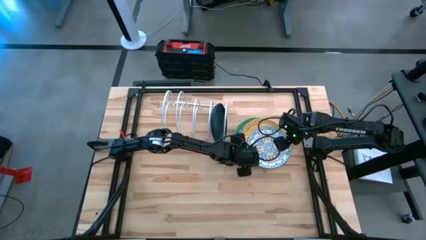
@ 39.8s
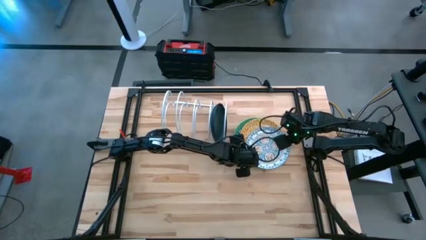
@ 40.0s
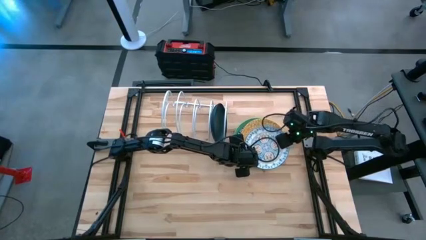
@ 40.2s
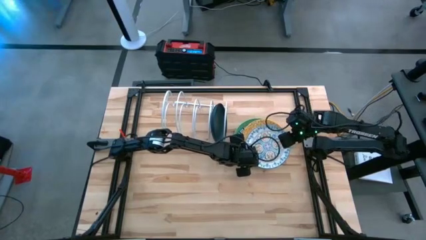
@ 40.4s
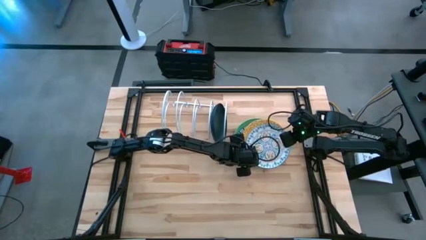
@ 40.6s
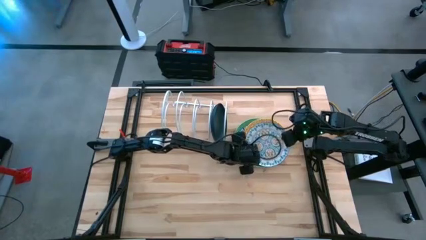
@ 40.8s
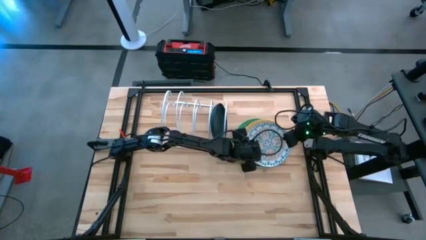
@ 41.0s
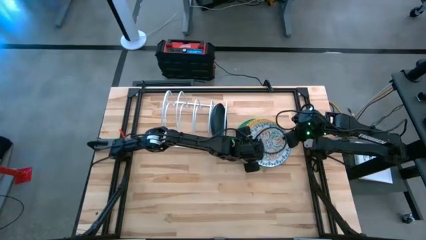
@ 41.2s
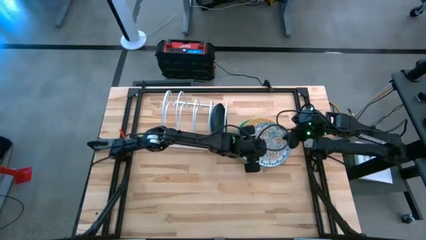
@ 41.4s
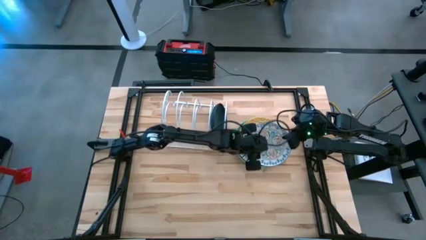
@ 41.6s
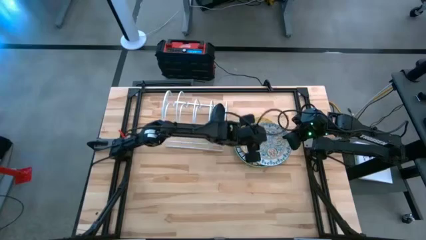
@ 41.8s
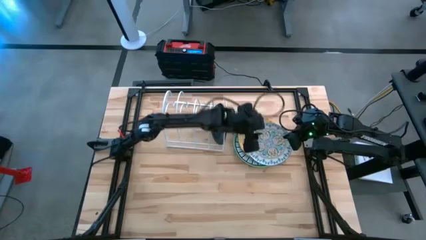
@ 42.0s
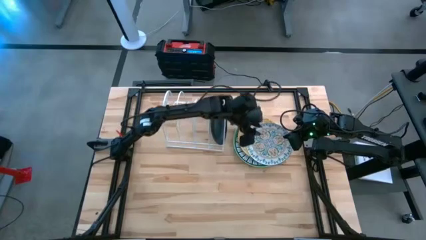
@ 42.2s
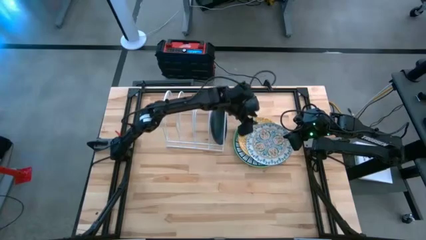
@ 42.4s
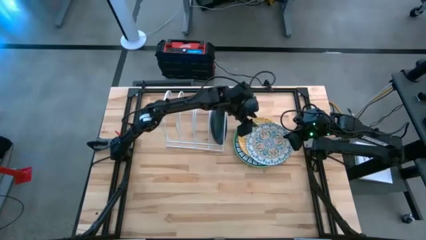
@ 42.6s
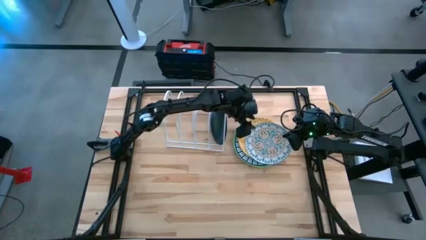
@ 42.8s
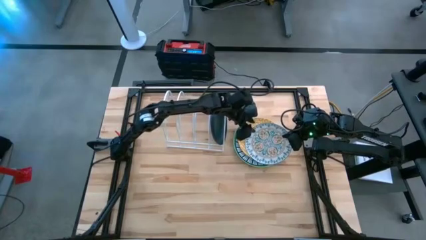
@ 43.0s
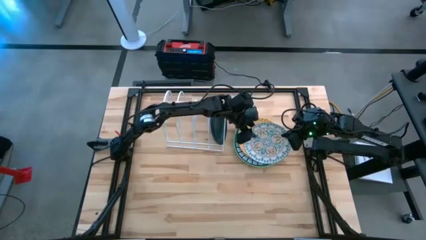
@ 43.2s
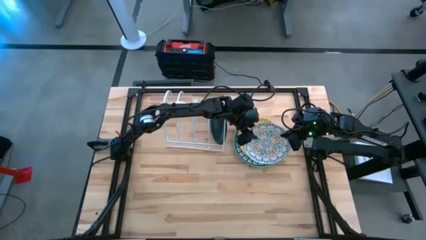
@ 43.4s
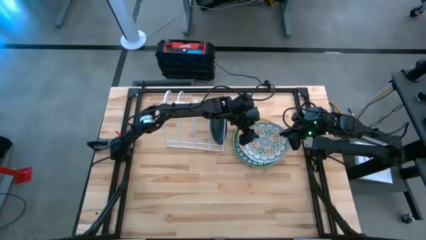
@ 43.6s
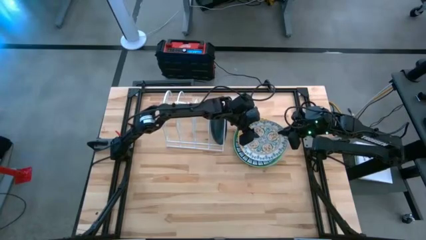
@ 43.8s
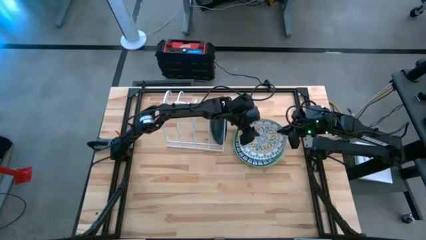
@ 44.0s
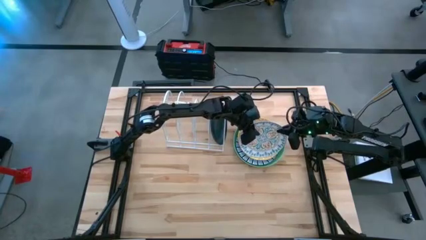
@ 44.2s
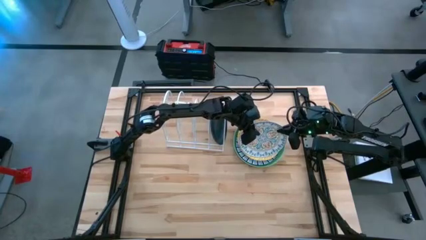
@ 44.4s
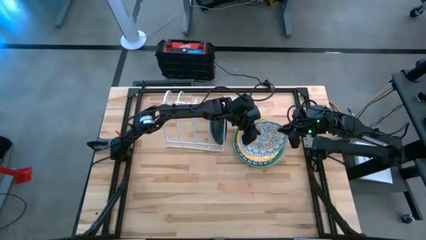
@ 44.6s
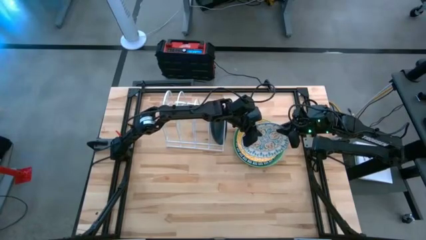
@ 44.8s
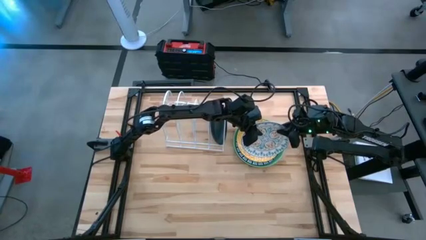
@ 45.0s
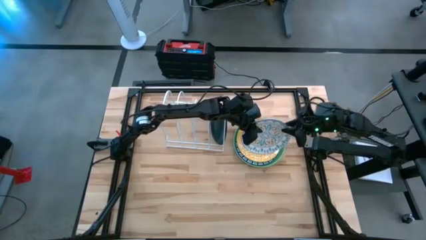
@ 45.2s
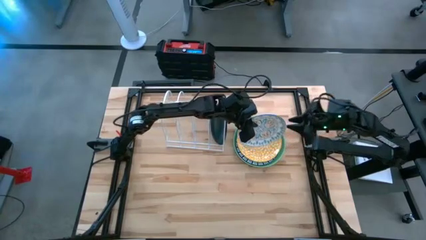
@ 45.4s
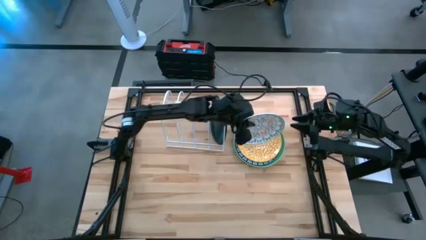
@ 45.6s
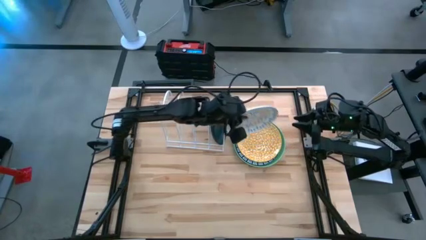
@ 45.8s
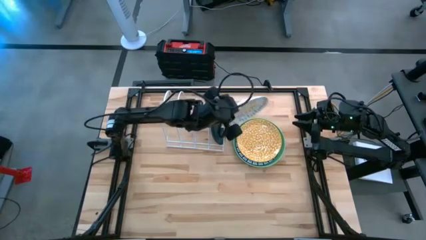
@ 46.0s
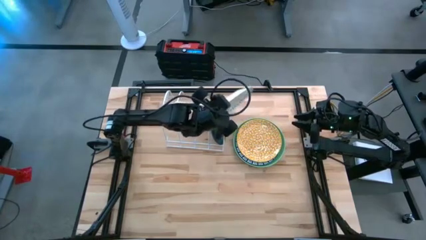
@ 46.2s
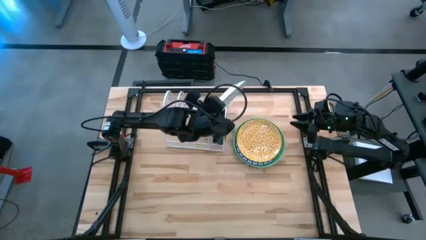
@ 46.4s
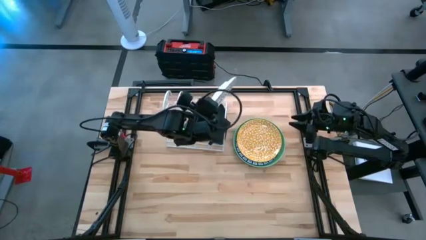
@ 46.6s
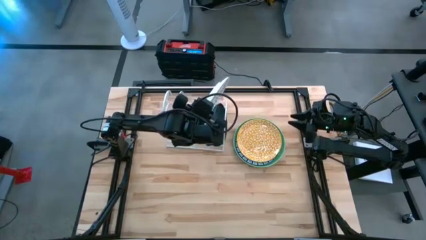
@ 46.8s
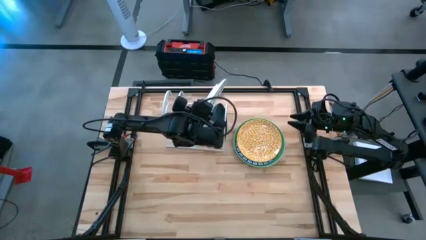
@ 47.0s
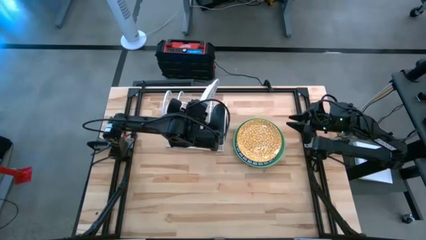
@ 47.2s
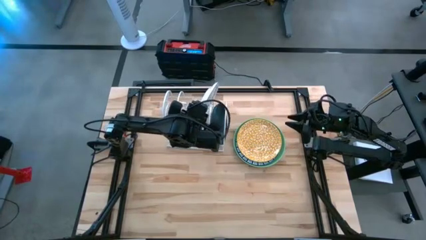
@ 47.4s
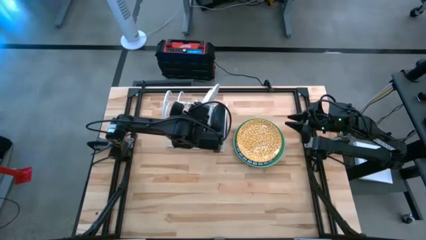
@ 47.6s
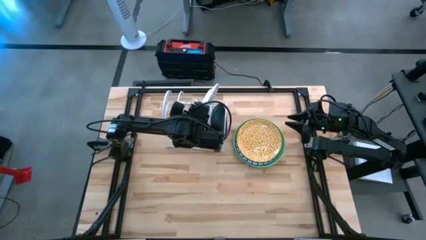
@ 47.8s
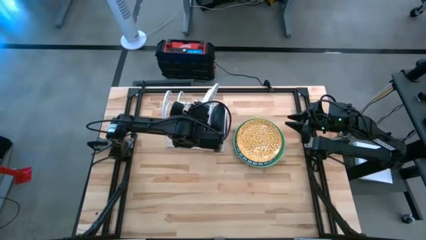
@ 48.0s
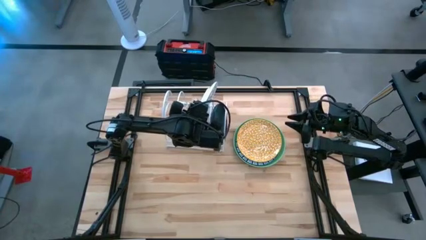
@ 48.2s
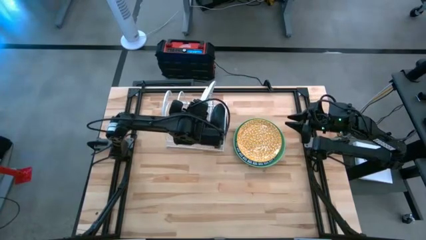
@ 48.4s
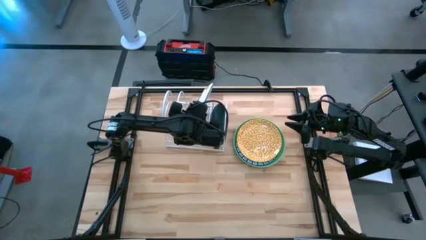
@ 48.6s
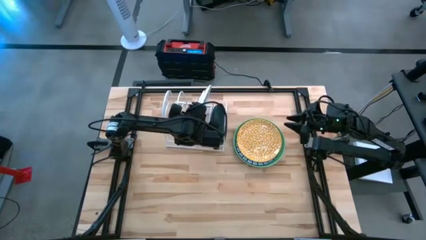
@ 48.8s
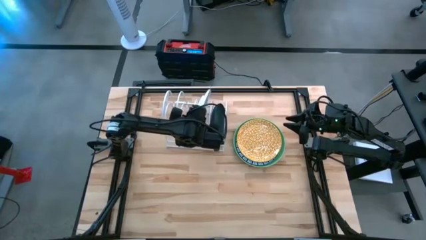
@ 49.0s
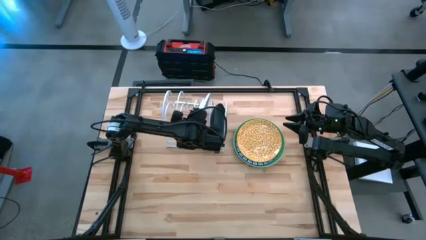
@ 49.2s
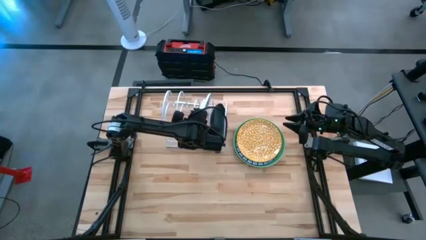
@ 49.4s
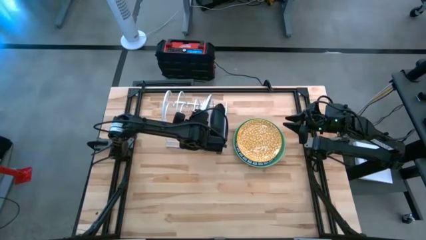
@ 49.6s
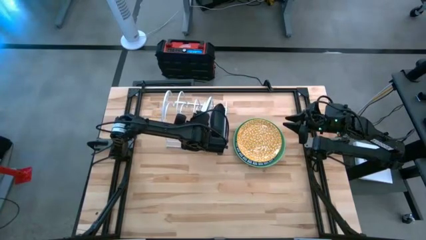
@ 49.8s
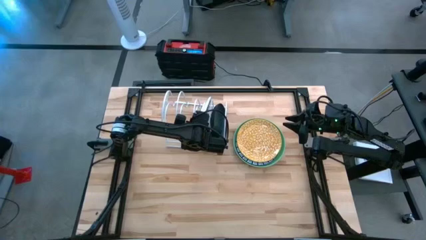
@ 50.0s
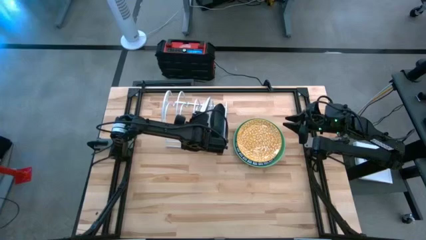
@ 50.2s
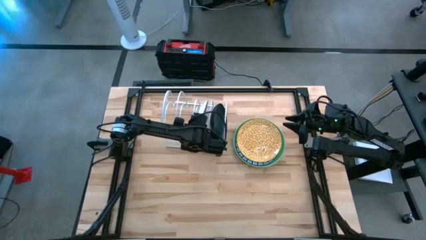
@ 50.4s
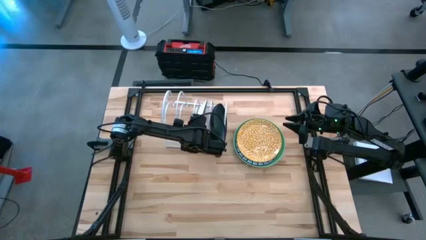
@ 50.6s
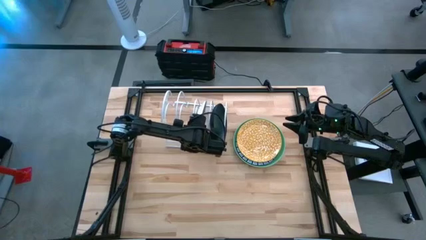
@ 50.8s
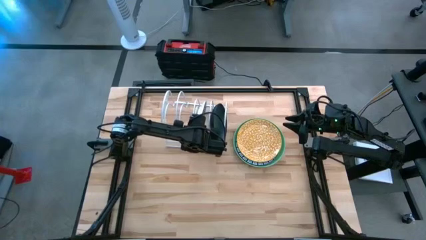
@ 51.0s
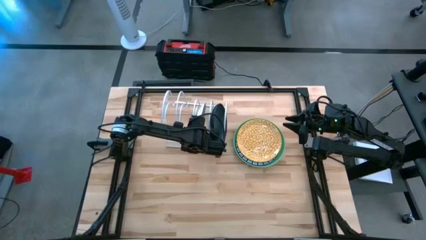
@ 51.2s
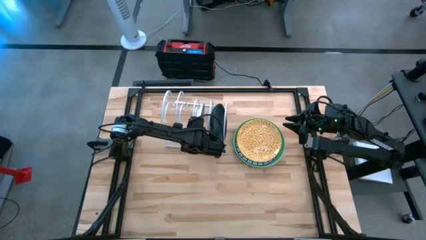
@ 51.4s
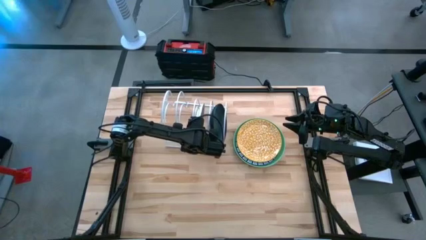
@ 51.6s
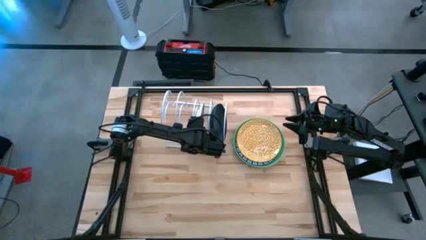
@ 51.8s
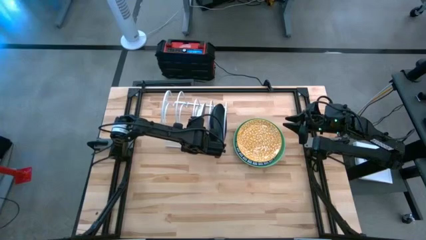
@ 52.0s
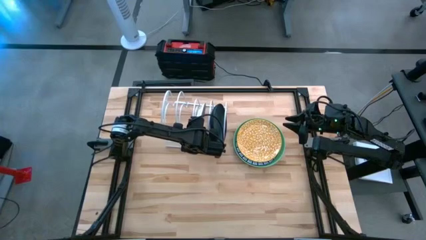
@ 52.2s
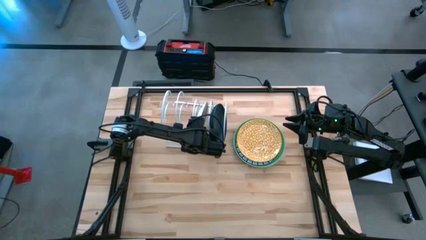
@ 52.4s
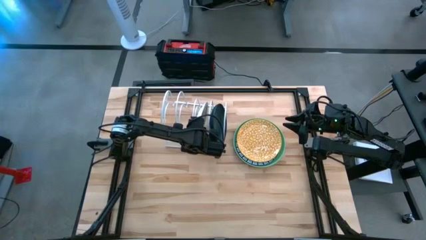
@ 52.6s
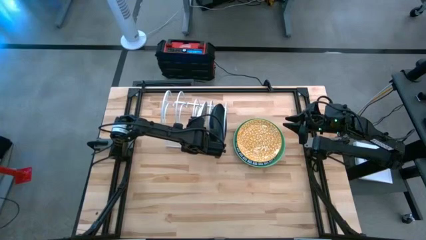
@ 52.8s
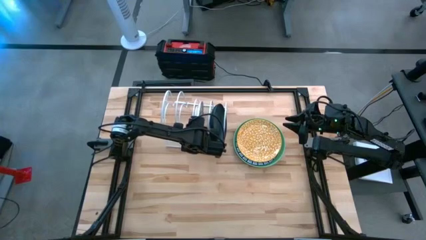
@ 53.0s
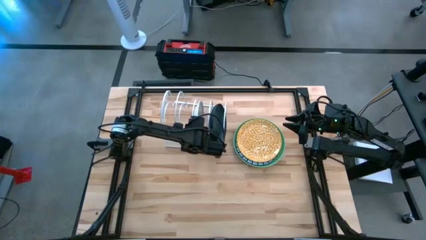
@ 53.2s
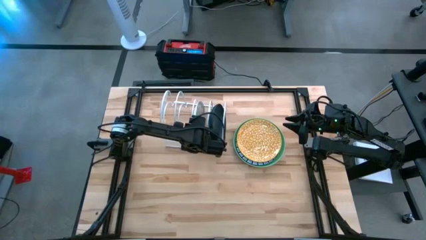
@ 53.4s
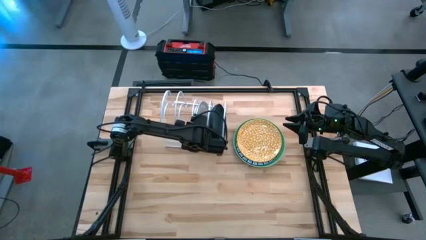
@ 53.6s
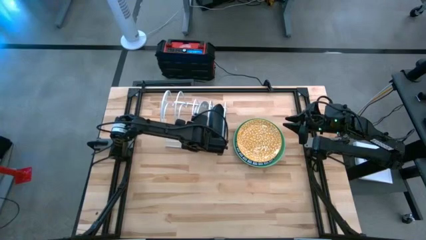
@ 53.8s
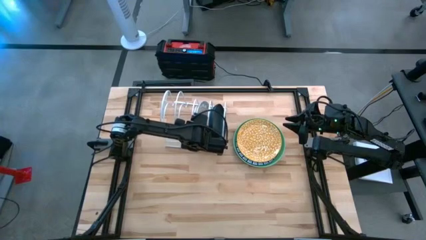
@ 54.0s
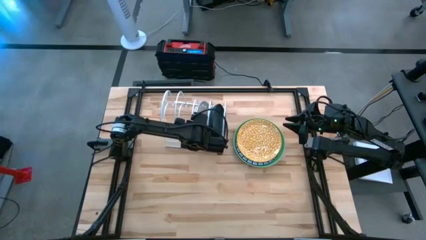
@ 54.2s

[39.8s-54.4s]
Task: Sort dishes
Put the white plate in the dish rack

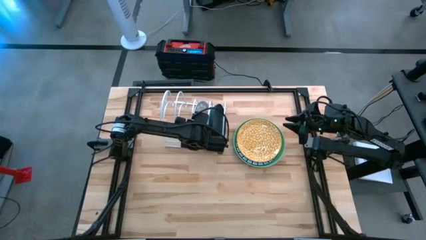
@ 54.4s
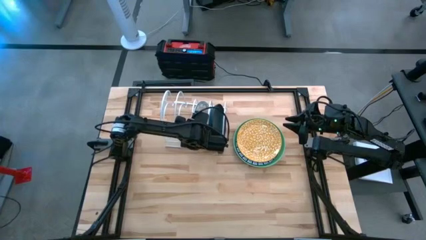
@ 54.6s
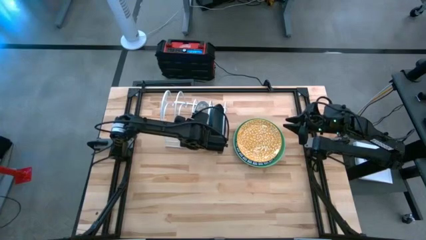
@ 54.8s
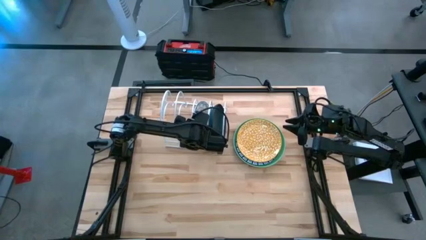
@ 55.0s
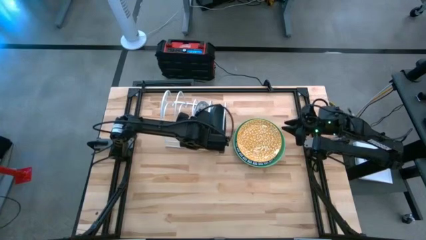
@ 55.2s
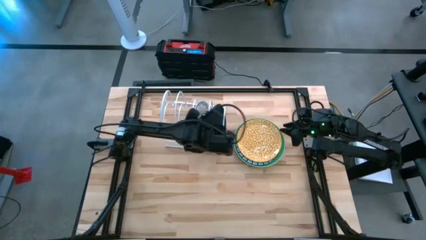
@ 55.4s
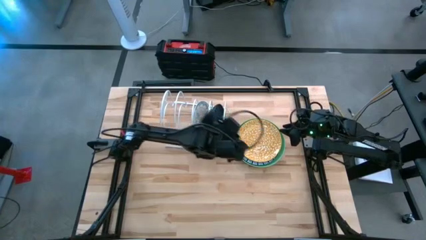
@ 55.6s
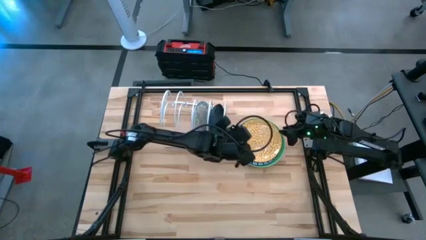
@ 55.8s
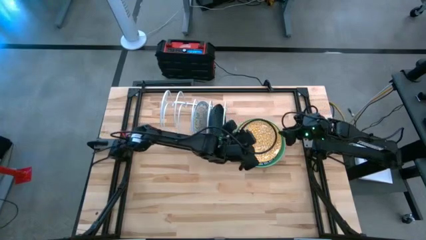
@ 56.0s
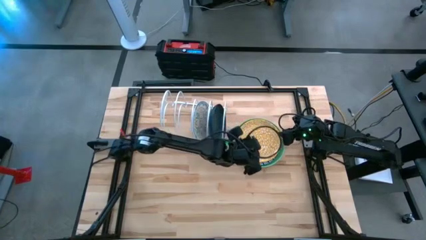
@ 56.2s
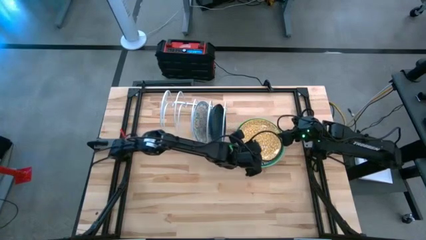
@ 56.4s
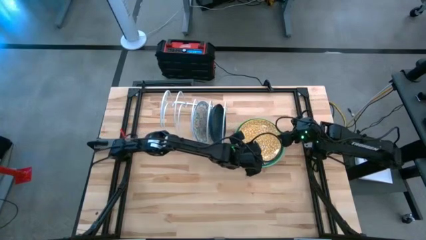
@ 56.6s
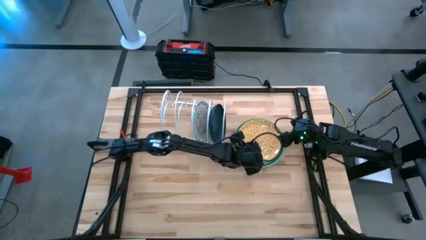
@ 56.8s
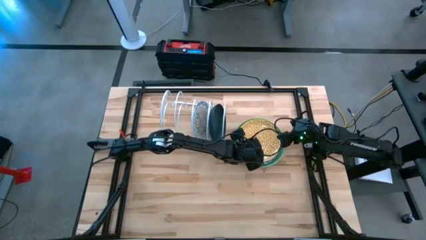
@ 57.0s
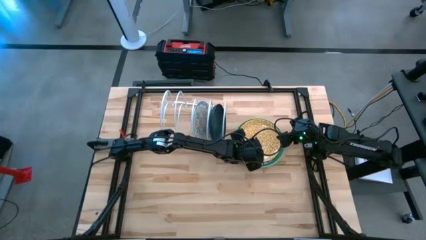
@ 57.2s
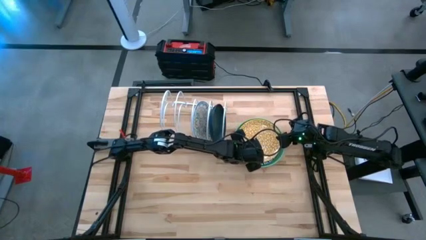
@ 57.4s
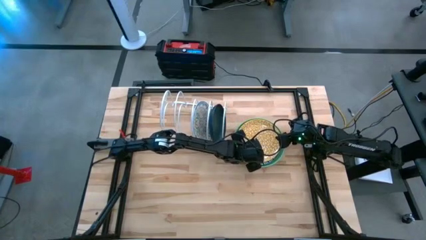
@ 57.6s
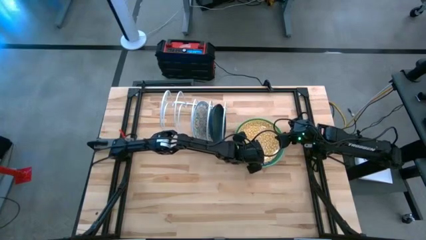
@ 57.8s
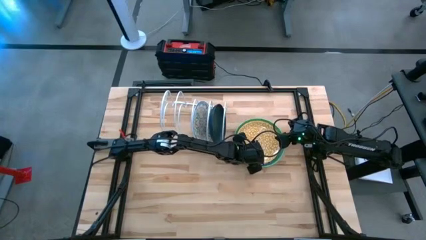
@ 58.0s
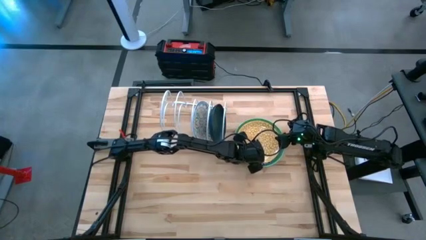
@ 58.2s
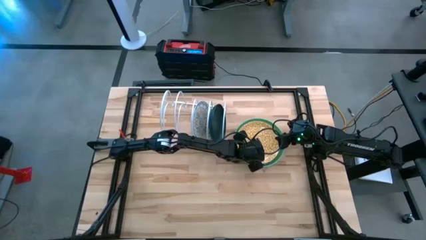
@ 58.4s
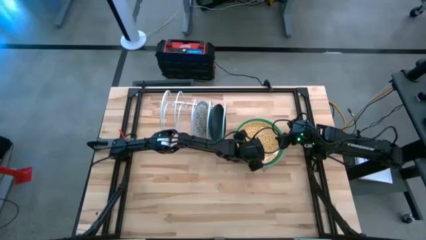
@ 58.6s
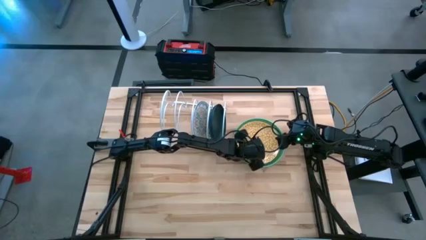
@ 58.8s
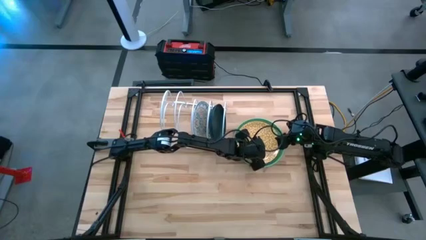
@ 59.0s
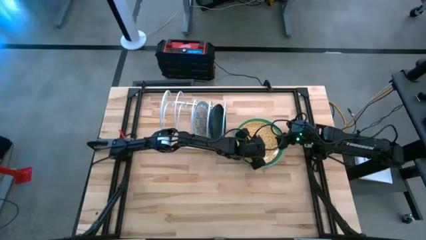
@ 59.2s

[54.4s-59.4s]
Put the yellow plate in the dish rack
